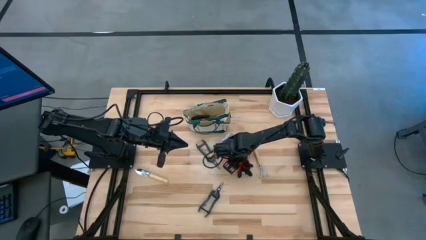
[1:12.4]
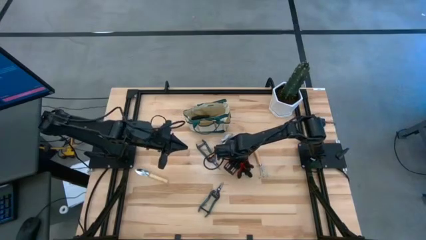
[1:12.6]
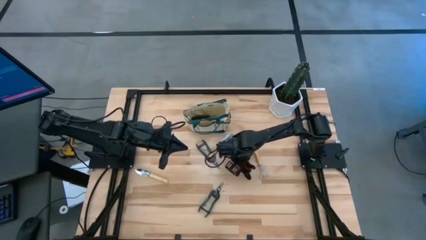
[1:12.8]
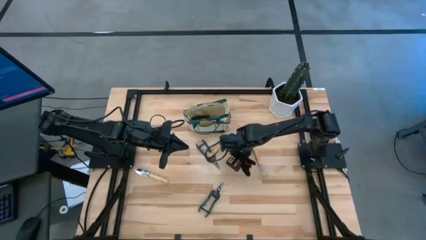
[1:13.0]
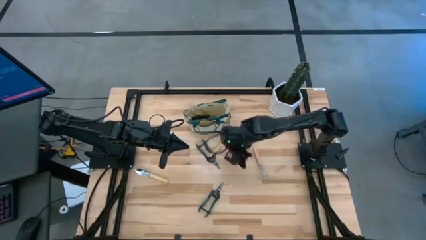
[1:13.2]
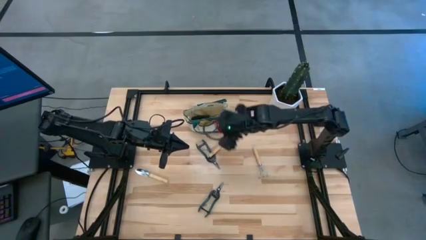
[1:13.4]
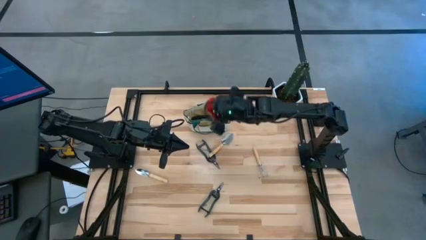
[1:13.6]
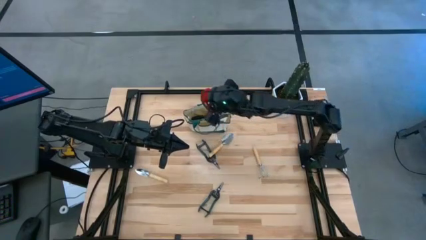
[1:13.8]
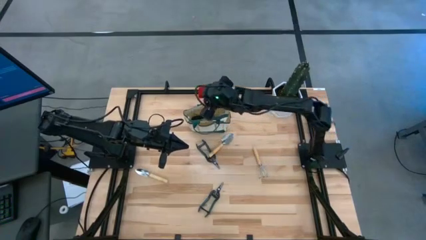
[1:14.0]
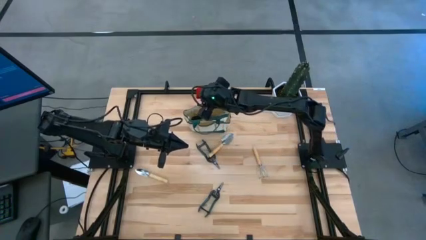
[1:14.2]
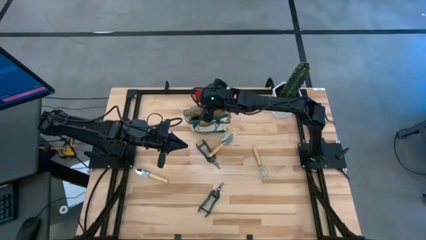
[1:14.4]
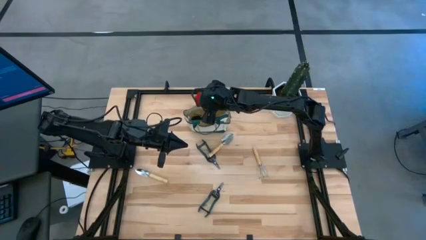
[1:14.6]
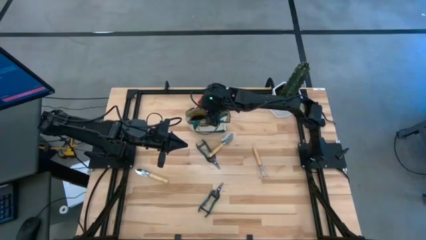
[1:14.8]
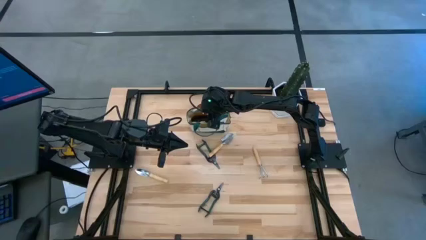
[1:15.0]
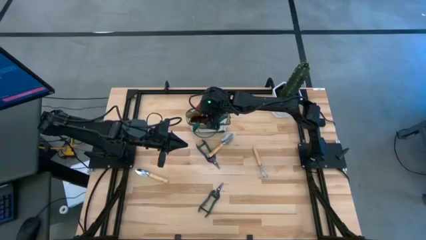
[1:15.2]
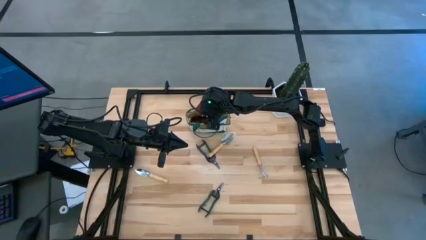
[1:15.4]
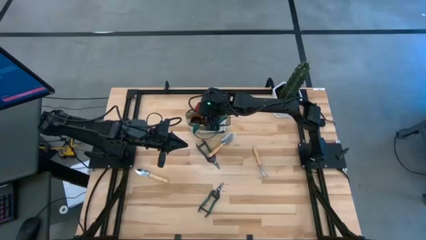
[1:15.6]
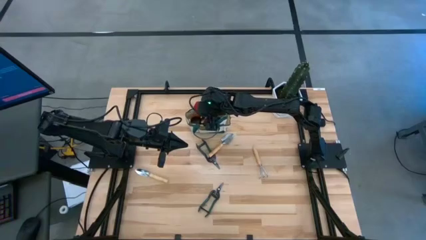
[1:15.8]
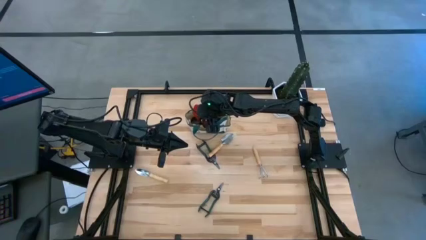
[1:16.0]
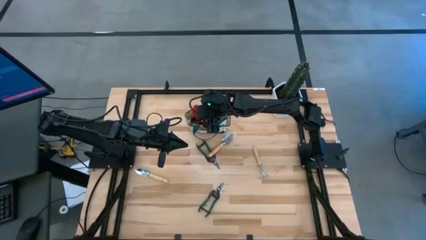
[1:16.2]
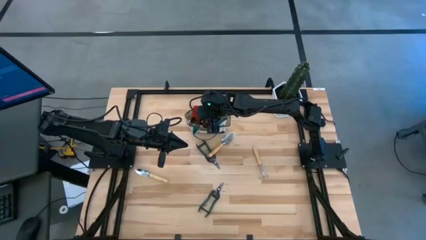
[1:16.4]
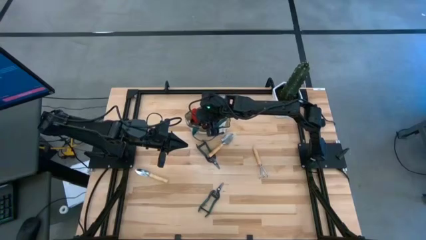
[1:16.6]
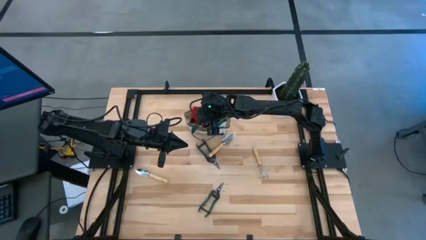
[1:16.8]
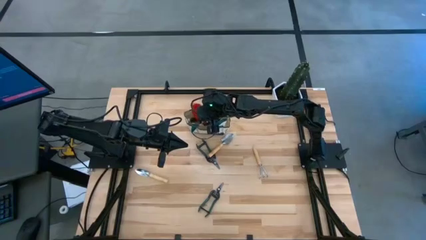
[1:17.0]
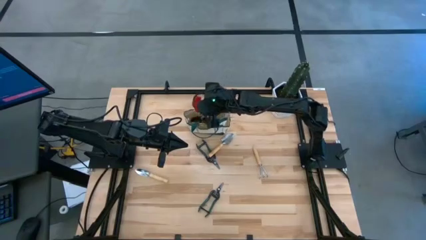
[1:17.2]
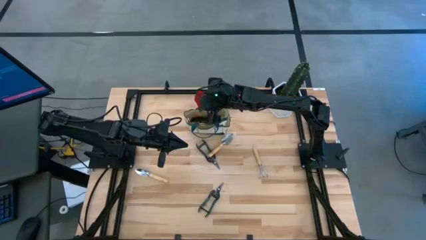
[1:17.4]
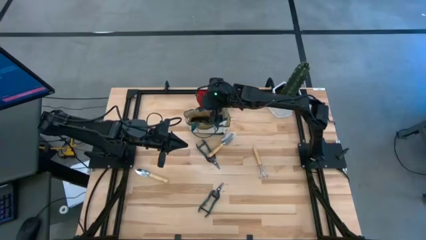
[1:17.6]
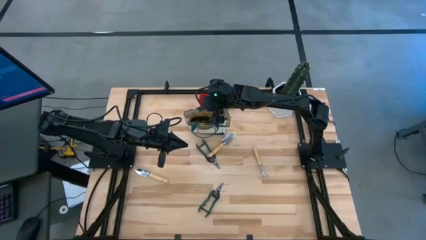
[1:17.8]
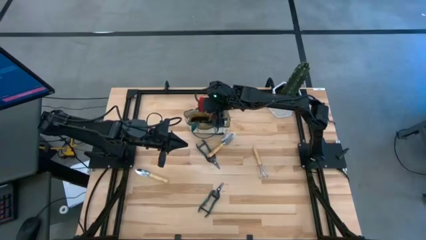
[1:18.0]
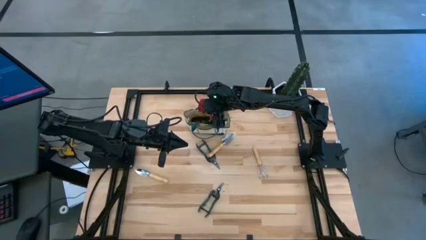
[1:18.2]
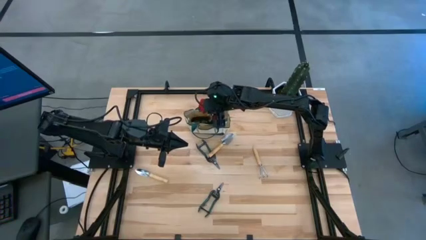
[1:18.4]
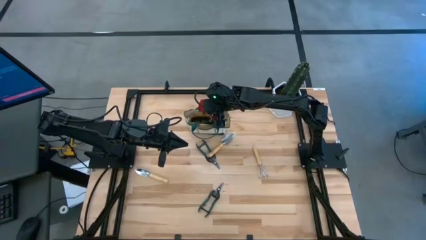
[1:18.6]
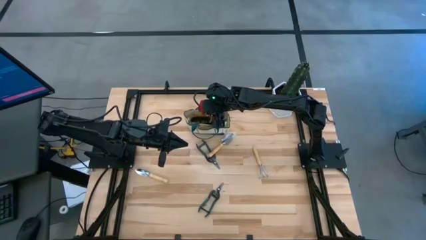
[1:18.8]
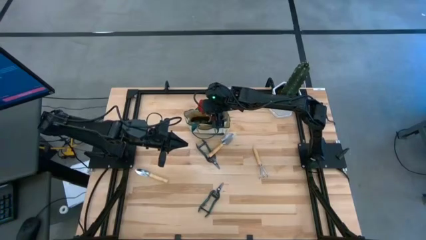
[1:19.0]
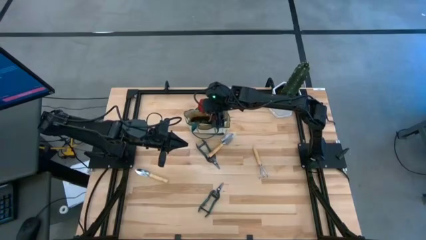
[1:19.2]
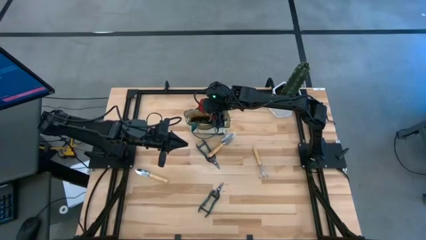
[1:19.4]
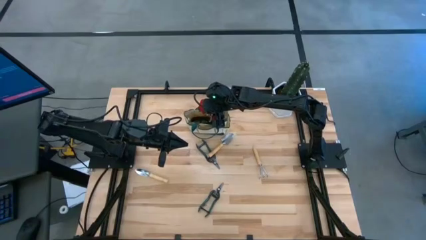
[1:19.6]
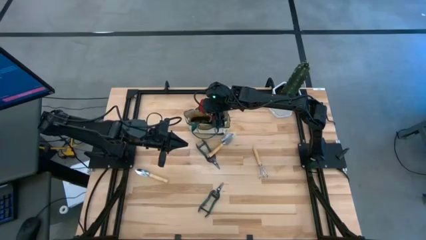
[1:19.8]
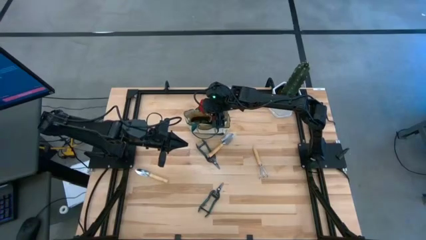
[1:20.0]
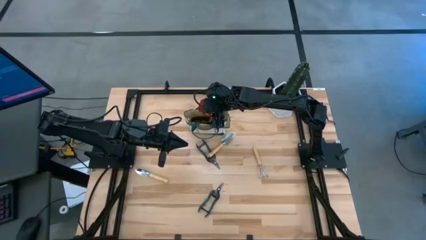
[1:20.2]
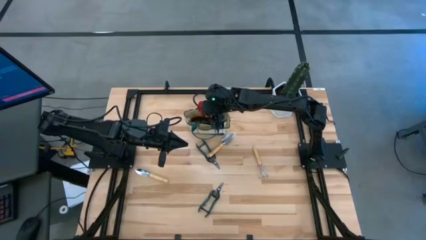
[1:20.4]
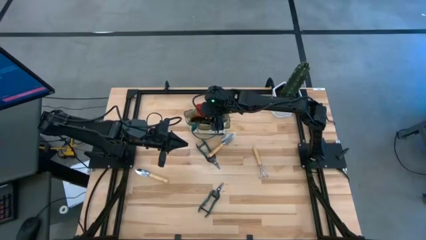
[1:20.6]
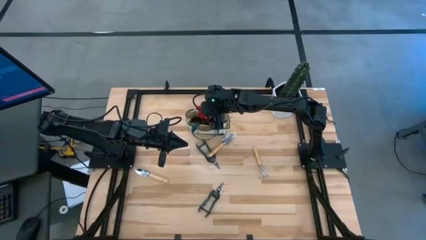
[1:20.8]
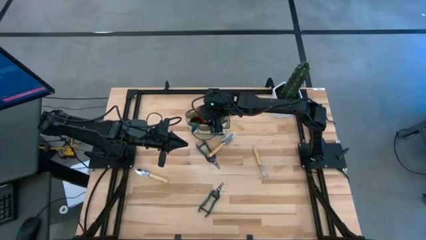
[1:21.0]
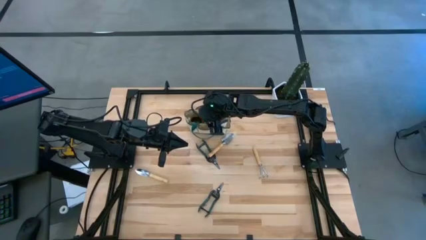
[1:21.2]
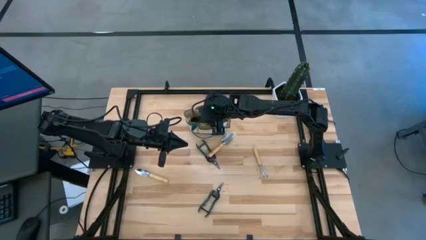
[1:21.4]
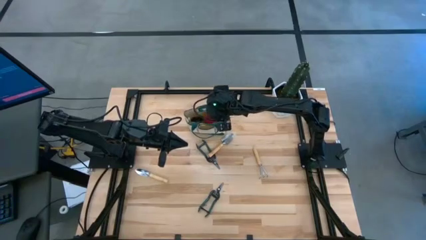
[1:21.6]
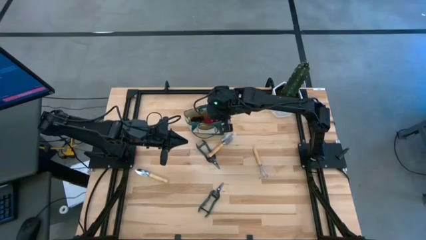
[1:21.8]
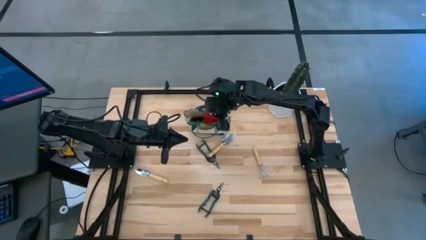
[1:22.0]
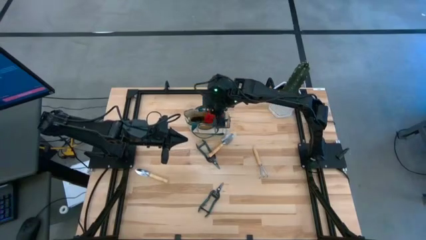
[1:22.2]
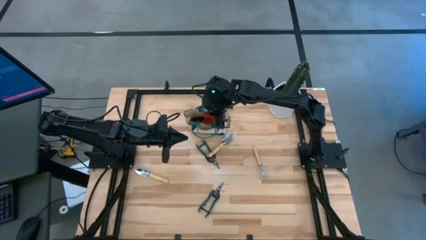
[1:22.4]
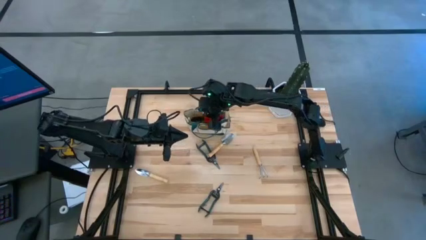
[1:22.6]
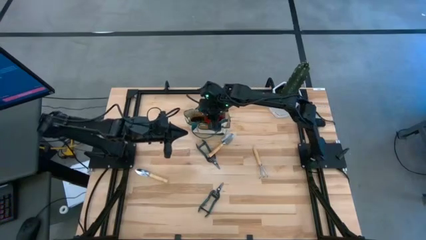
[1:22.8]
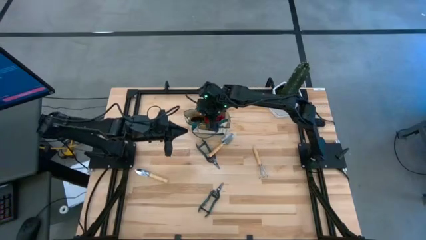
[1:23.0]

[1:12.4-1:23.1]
Task: Pick & Place Garden tools in Gardening bag
Put the red gloves into the brown gardening bag

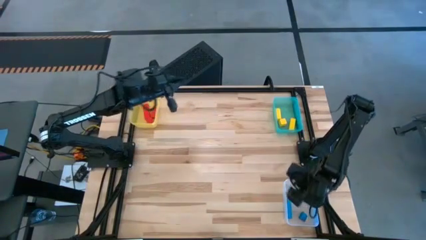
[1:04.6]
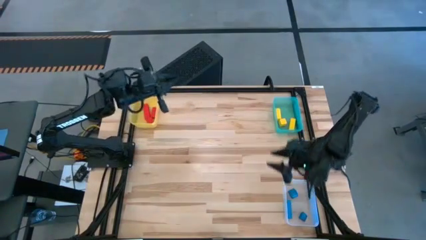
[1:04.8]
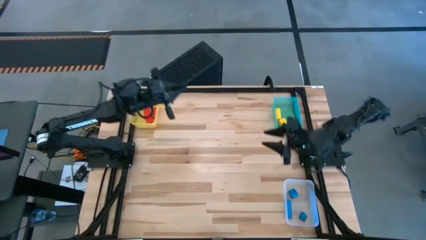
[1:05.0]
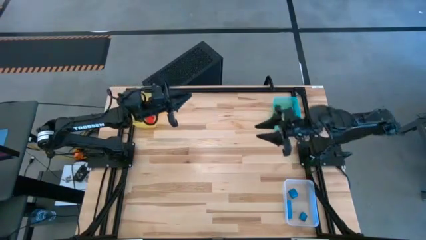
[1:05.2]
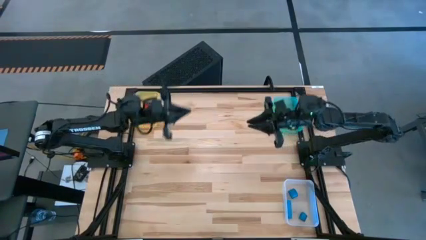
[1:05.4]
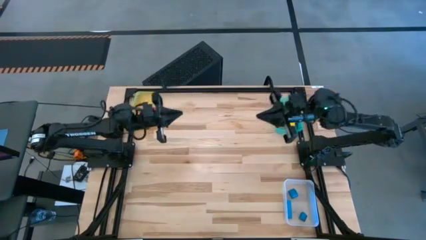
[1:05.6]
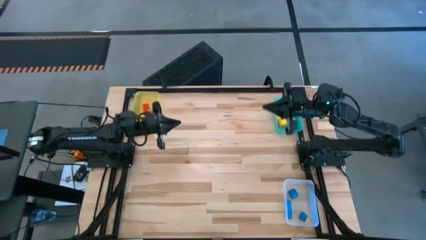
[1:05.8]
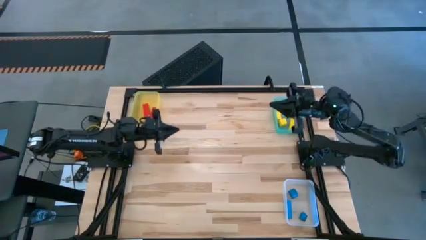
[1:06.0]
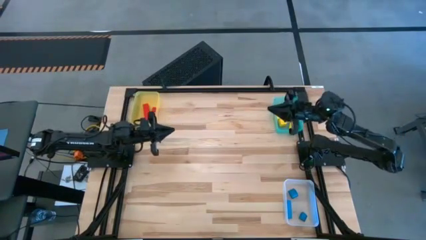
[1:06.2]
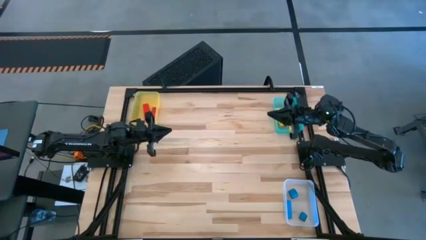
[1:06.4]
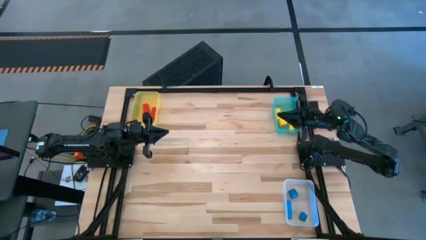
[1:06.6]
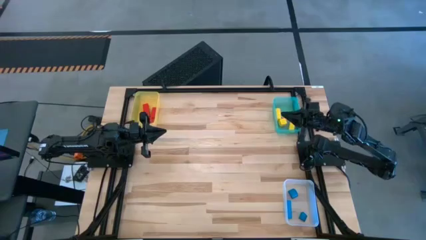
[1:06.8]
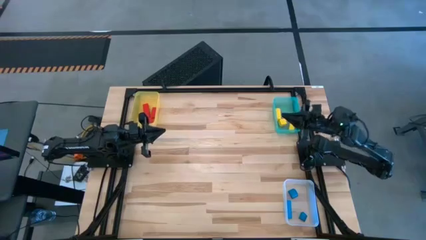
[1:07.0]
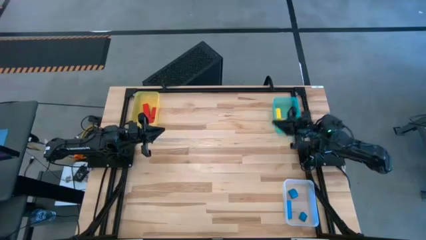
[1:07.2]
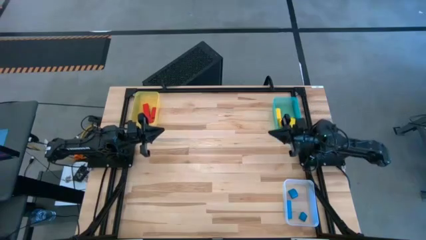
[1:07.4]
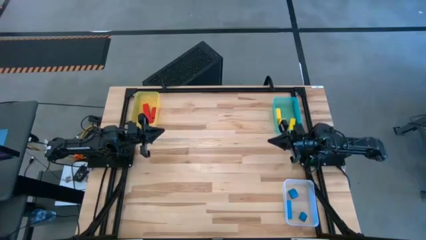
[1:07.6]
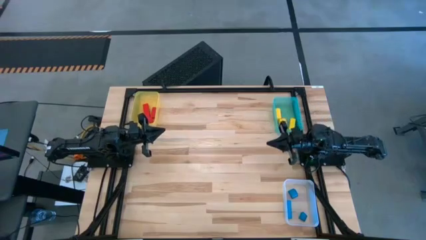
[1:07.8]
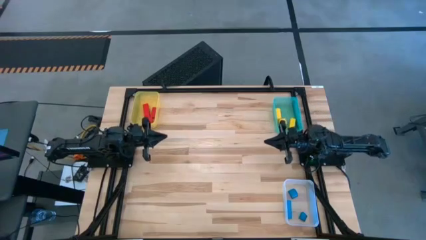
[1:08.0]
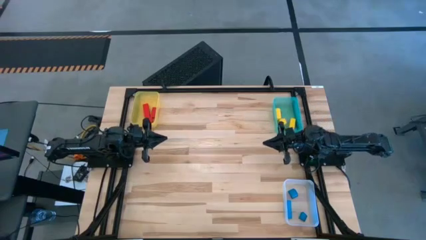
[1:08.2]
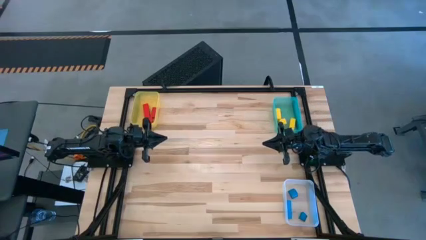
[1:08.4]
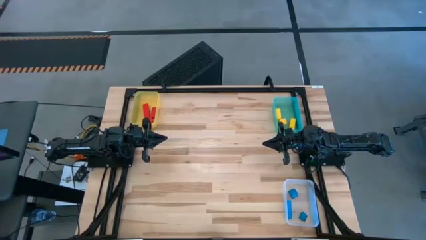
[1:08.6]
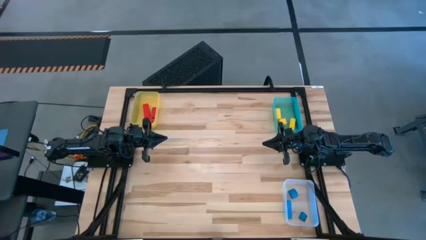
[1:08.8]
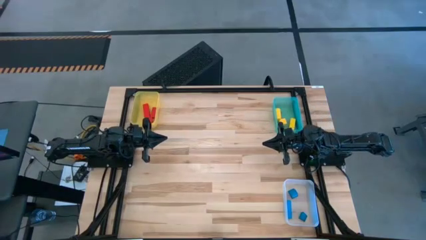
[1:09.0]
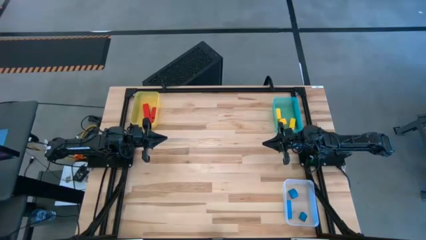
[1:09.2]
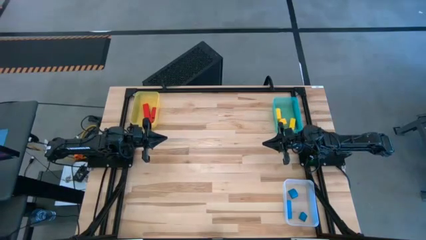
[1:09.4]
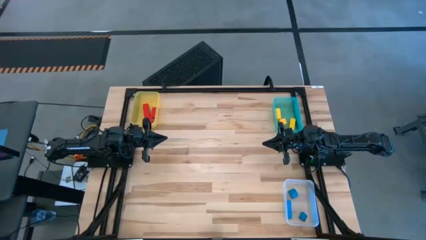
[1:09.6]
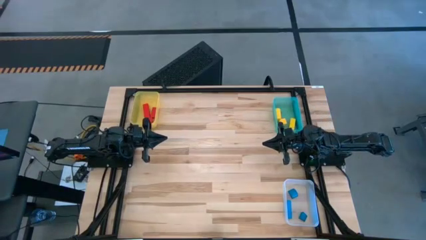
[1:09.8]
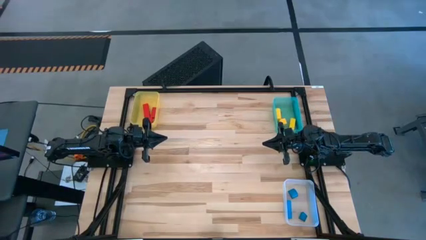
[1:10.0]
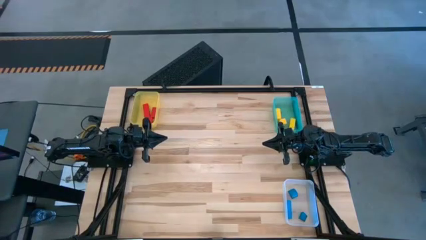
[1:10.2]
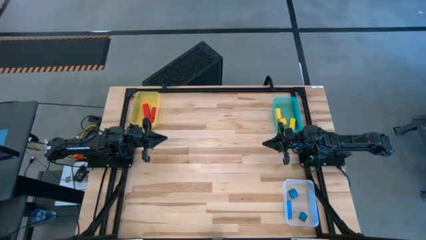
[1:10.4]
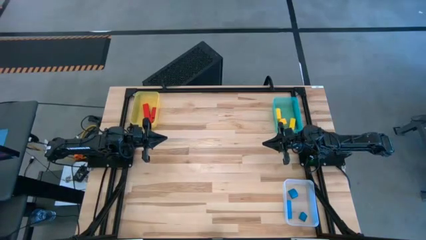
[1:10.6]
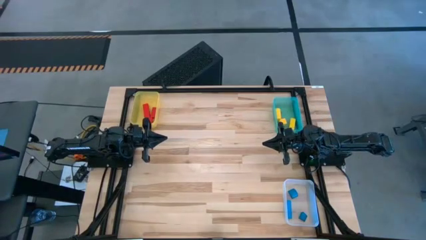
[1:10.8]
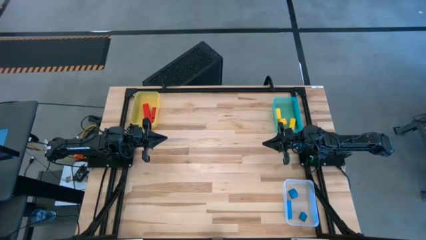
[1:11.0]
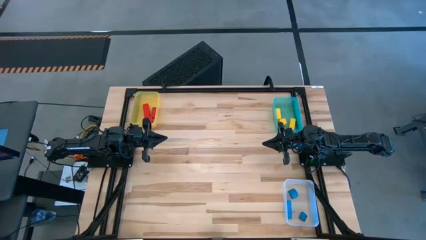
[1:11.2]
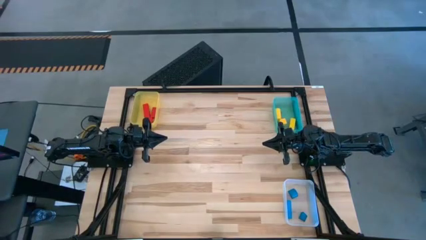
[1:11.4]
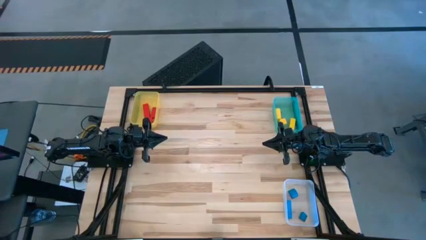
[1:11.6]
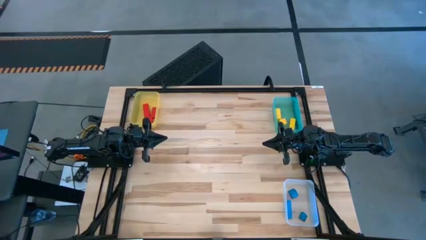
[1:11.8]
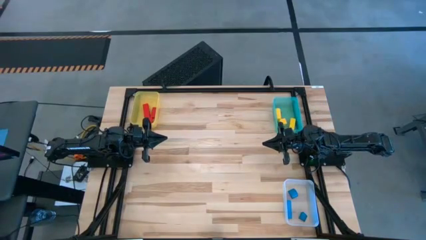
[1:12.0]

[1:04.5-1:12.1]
Task: Sort & place blocks by color
Return to Home Position
